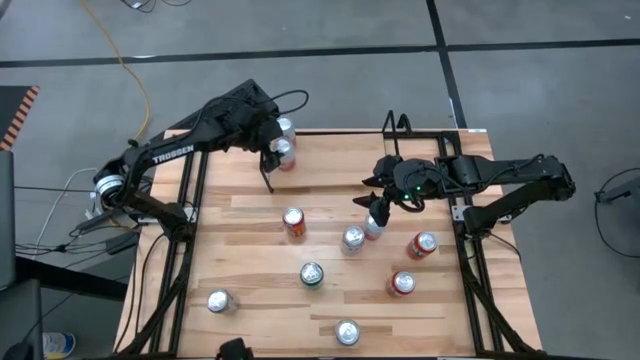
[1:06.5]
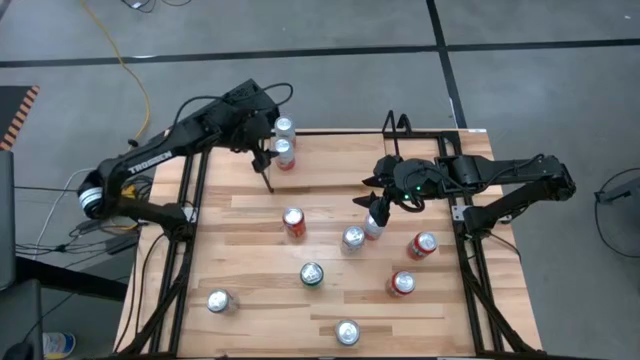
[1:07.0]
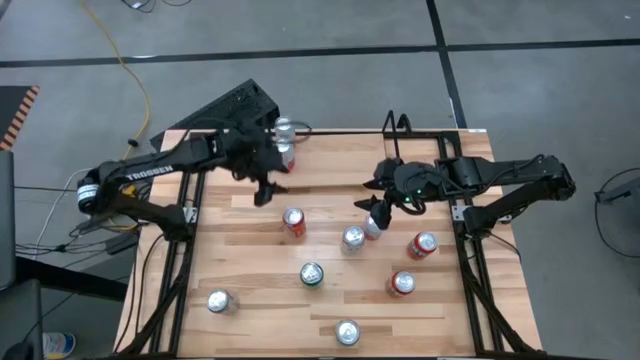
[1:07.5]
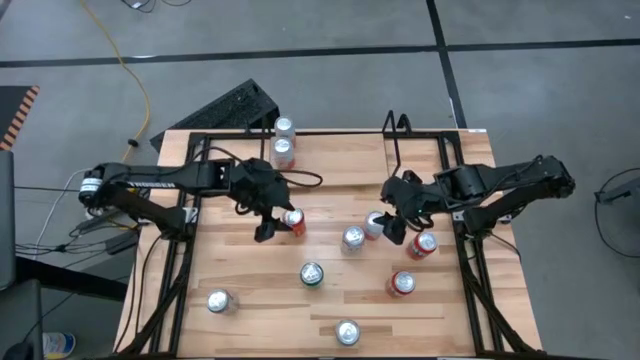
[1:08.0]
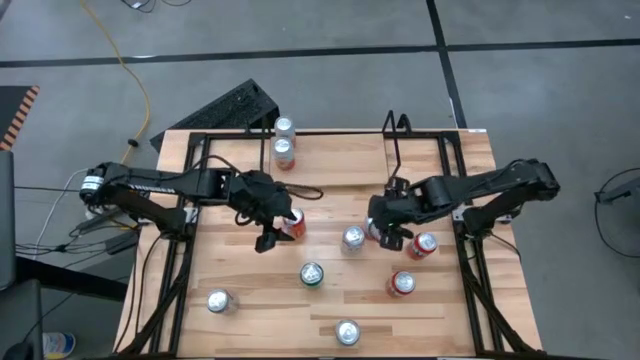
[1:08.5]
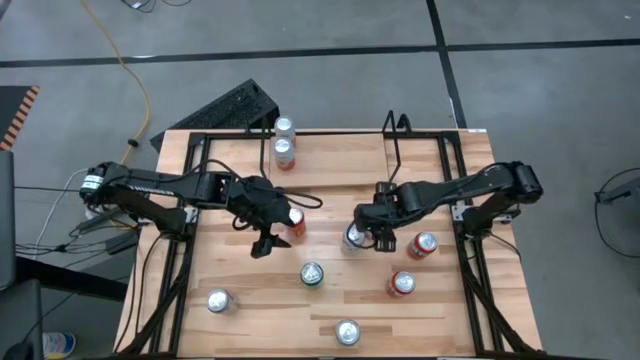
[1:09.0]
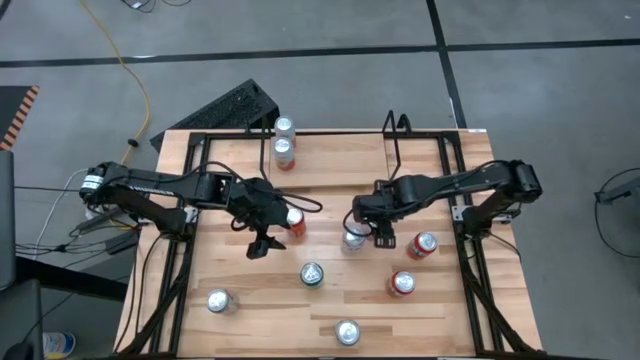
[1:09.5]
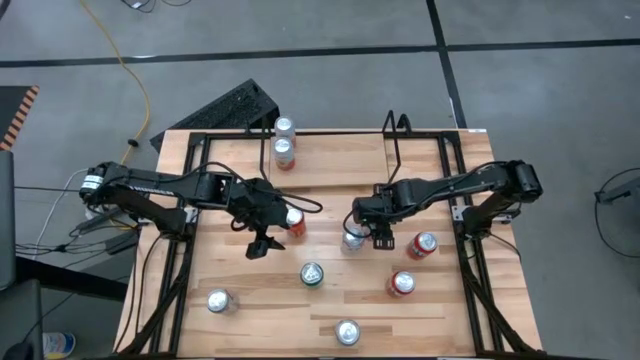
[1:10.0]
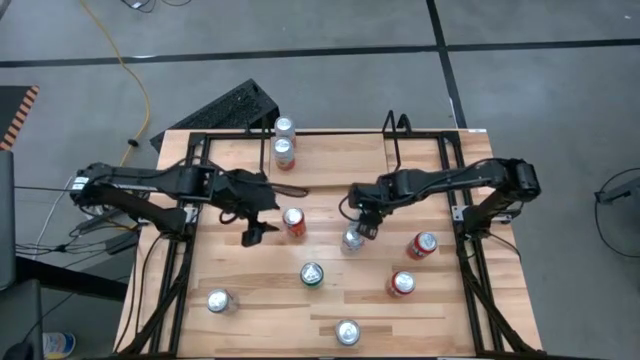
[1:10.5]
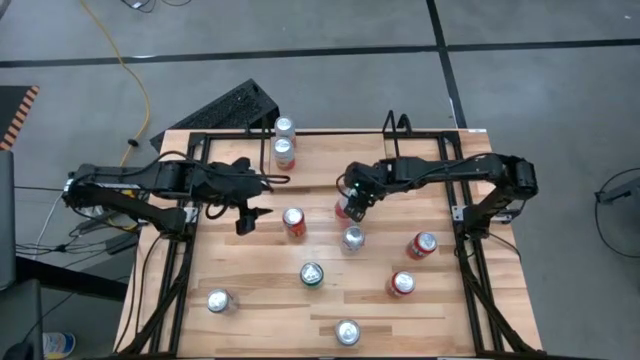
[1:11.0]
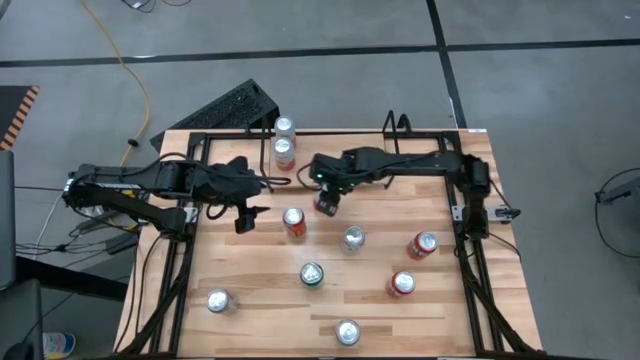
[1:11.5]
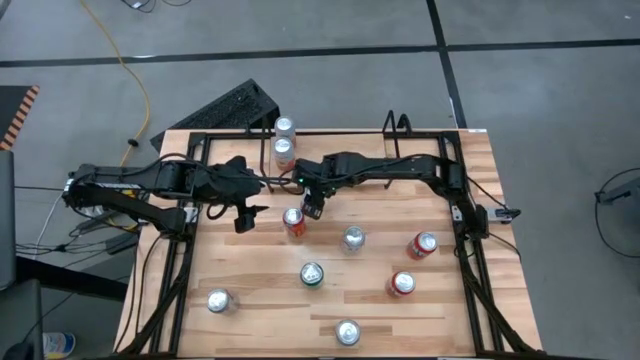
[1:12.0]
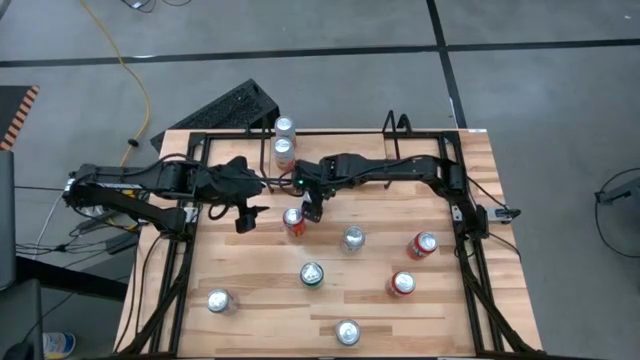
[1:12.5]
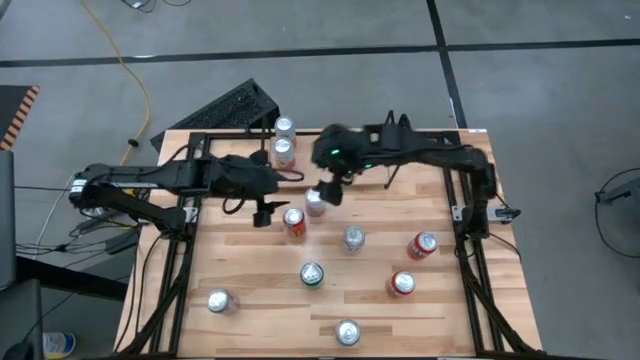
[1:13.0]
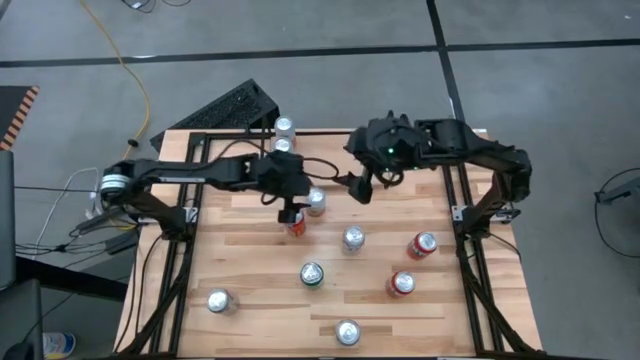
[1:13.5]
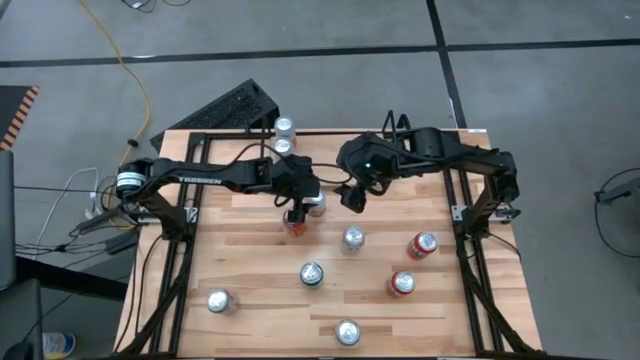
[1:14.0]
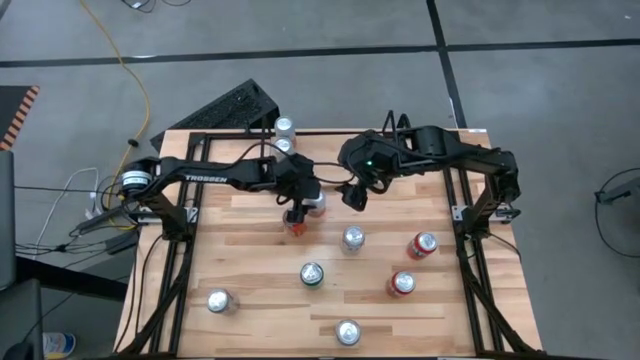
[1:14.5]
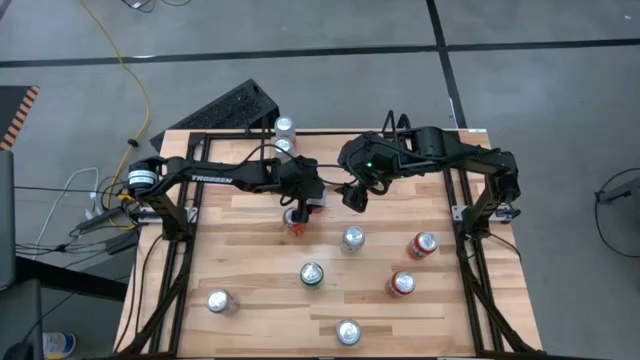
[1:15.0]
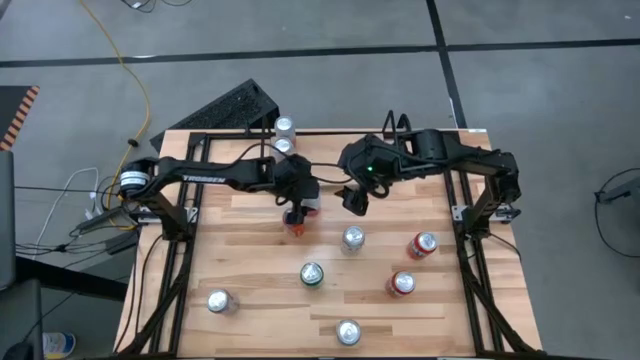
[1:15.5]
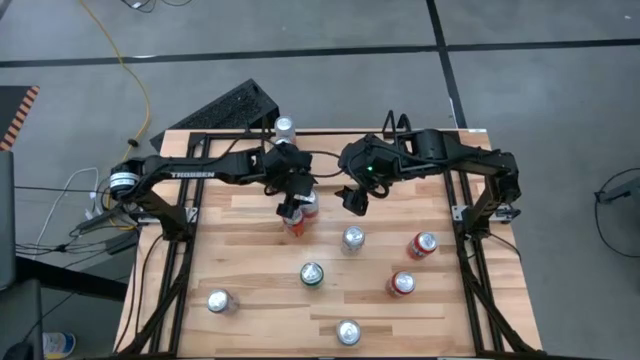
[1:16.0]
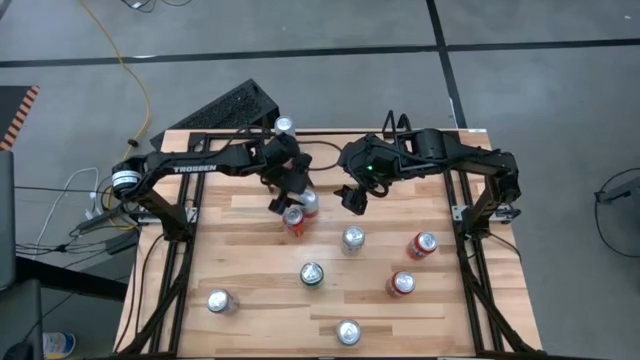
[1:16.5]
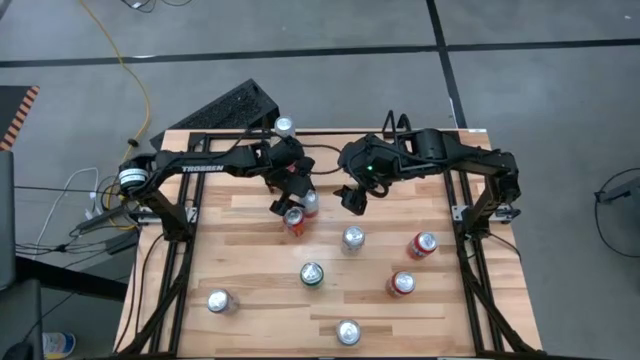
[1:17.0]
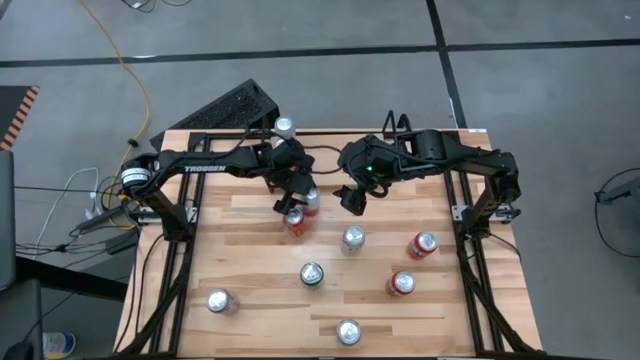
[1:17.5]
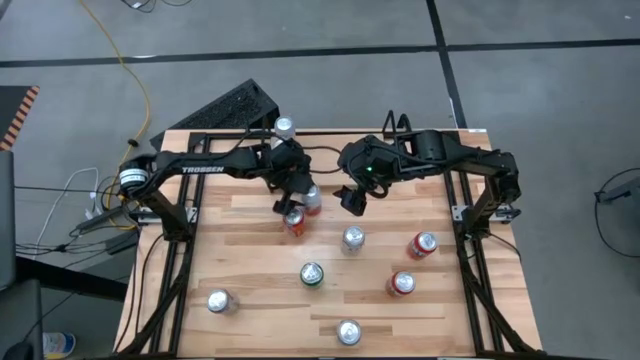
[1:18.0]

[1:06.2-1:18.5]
Task: Place canned beverage on shelf
Put the white orange soda can on the shelf aligned with the other white orange soda cans

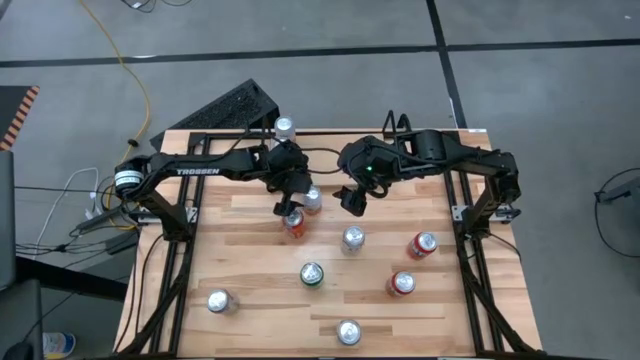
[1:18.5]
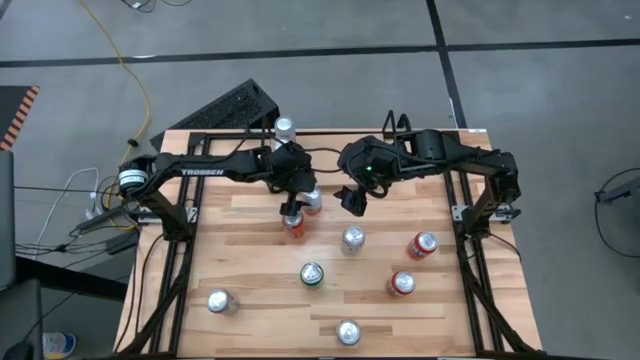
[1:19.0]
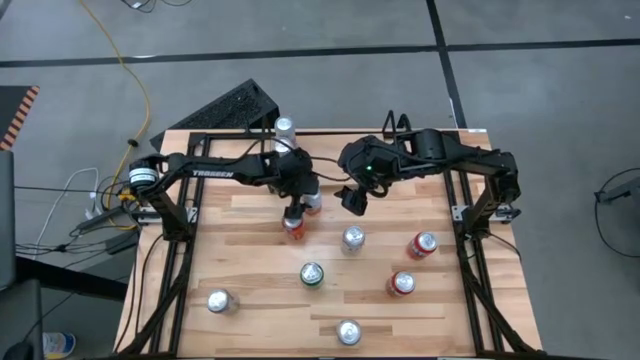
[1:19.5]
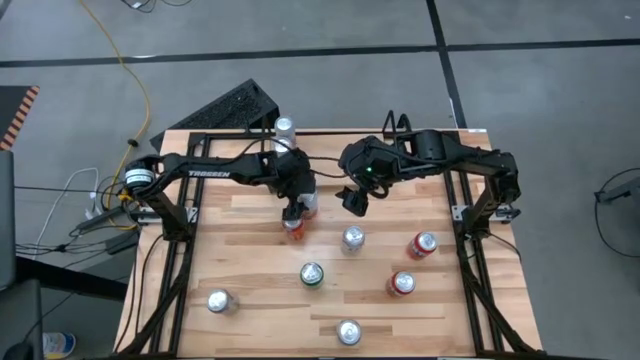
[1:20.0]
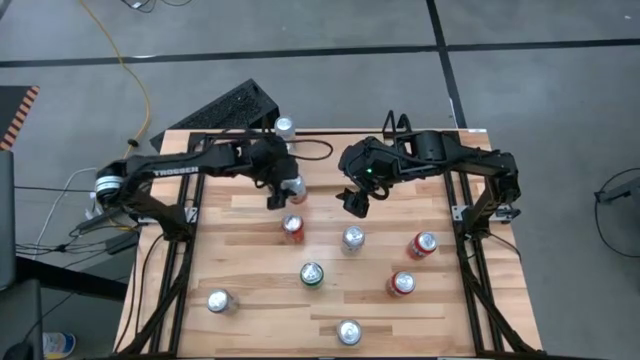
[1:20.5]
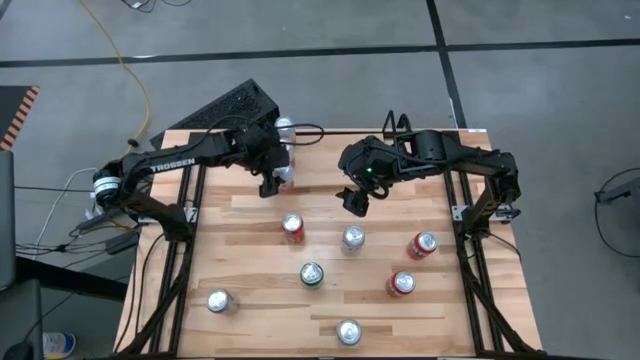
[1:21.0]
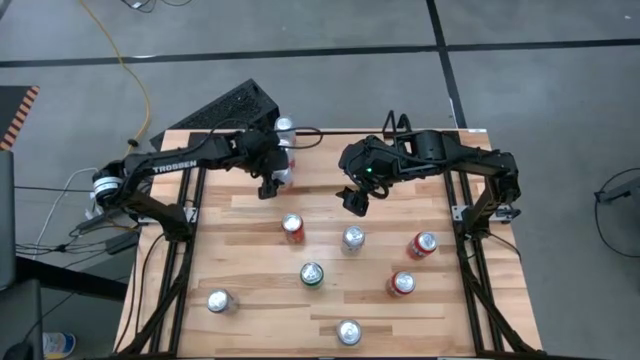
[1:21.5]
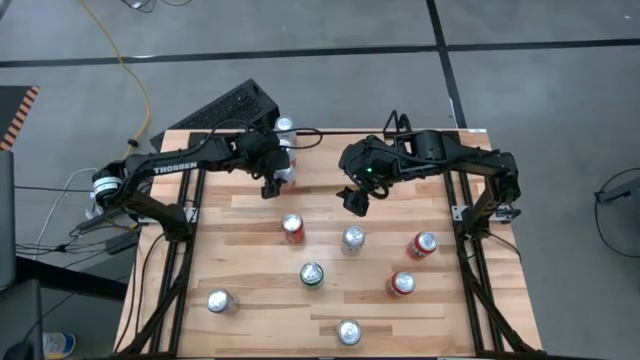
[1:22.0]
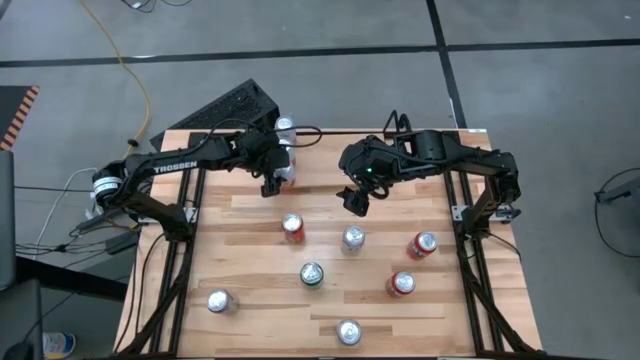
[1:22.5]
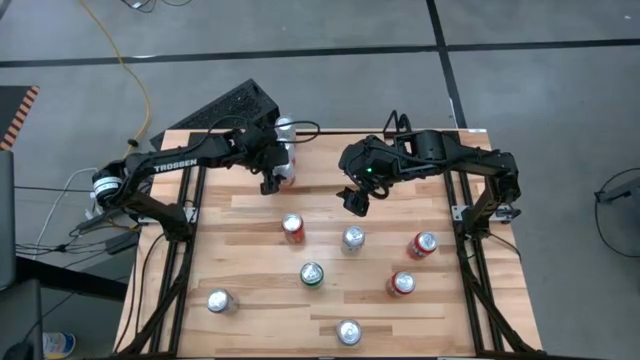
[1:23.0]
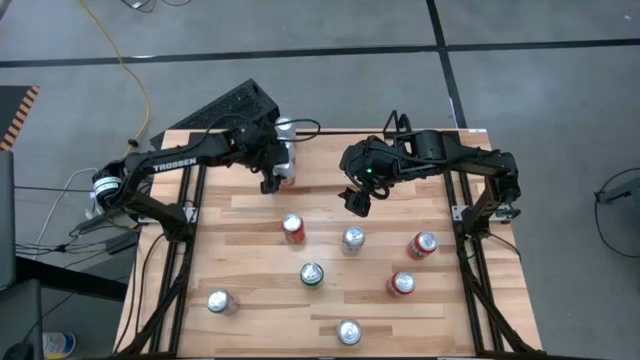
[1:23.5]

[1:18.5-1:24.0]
Put the white orange soda can on the shelf aligned with the other soda cans
